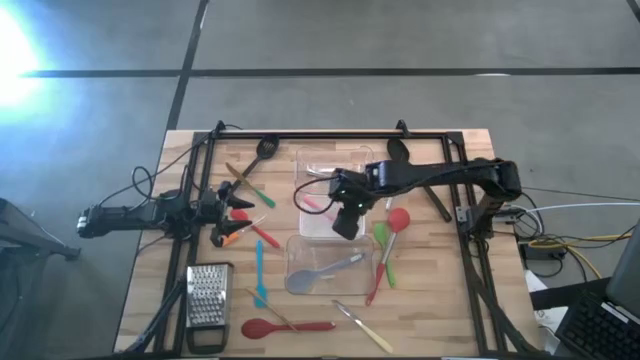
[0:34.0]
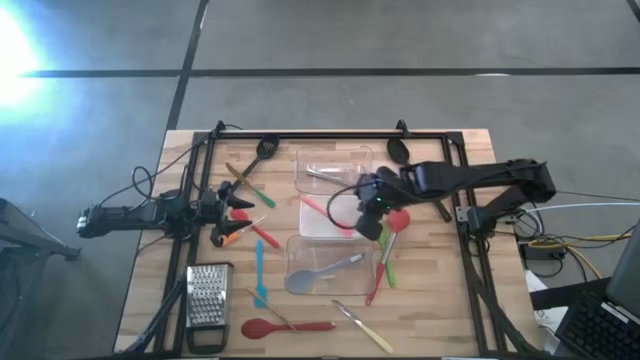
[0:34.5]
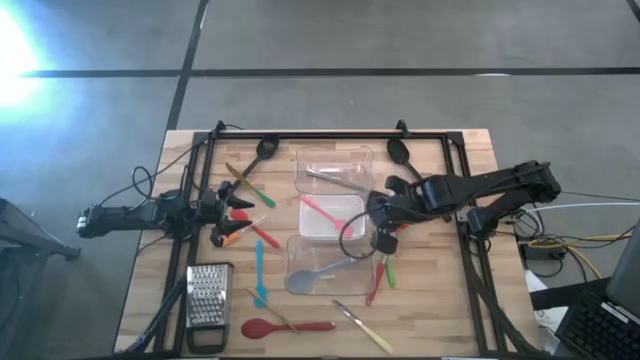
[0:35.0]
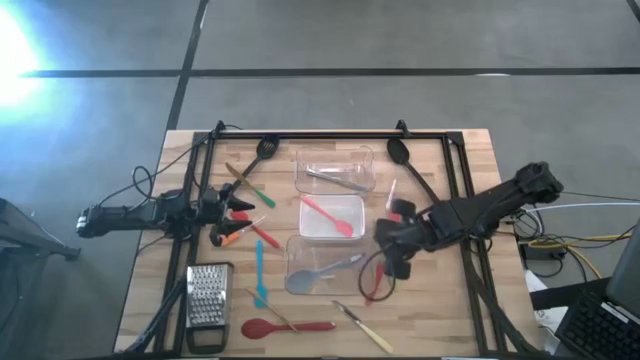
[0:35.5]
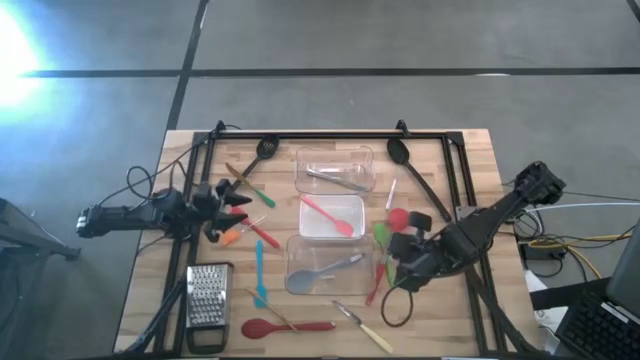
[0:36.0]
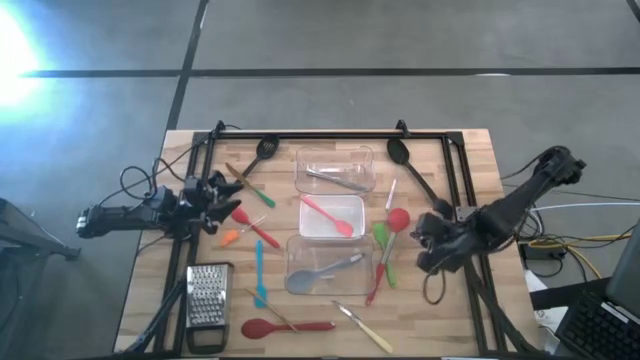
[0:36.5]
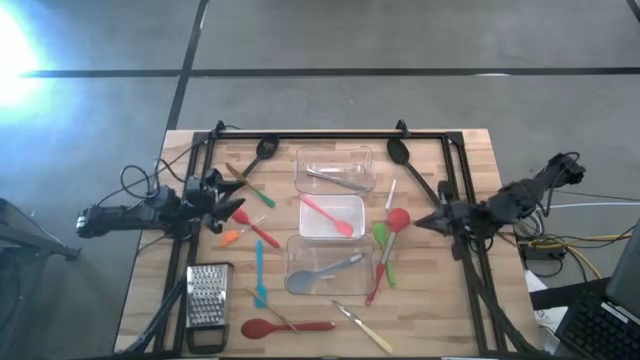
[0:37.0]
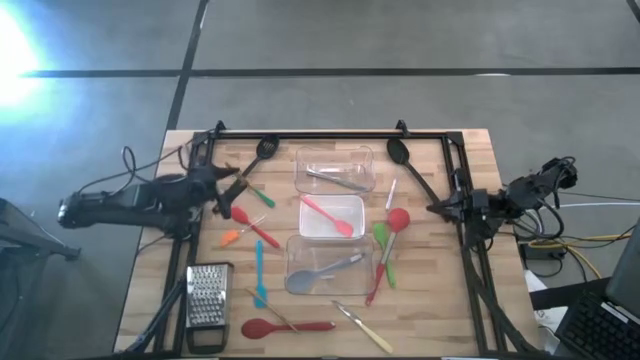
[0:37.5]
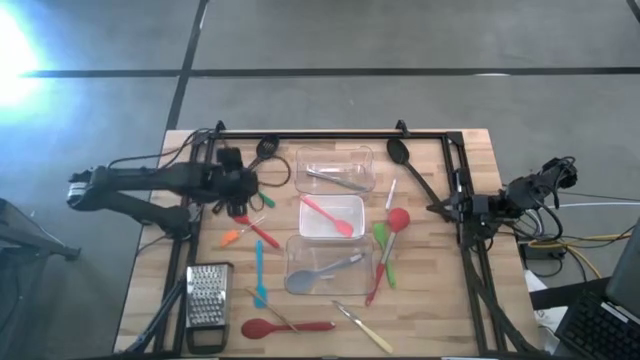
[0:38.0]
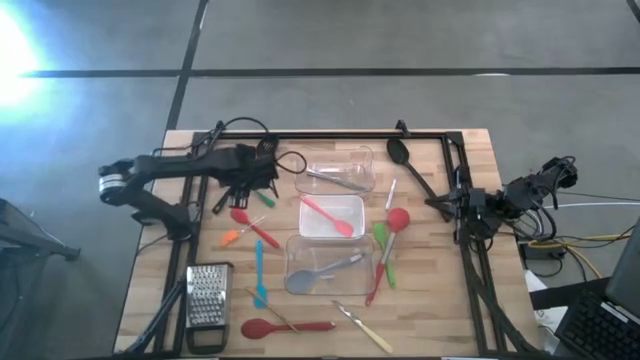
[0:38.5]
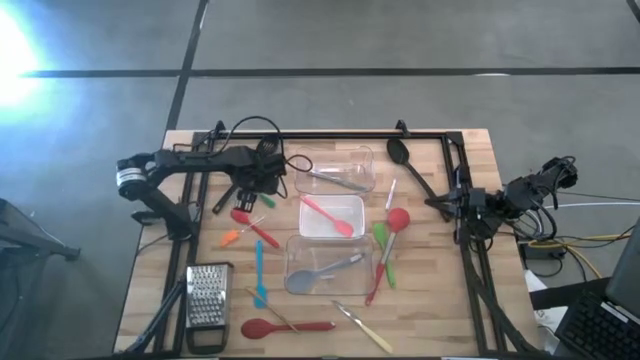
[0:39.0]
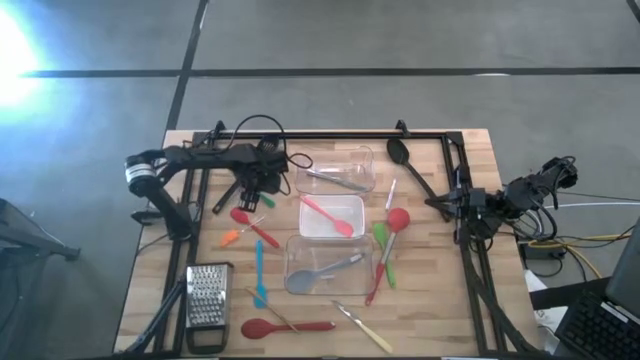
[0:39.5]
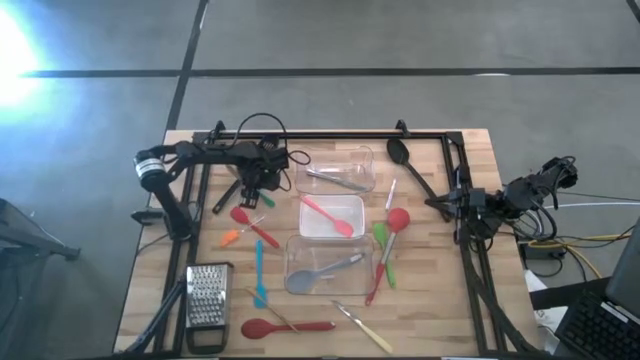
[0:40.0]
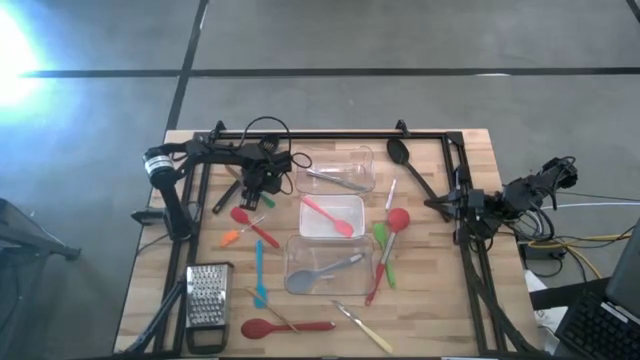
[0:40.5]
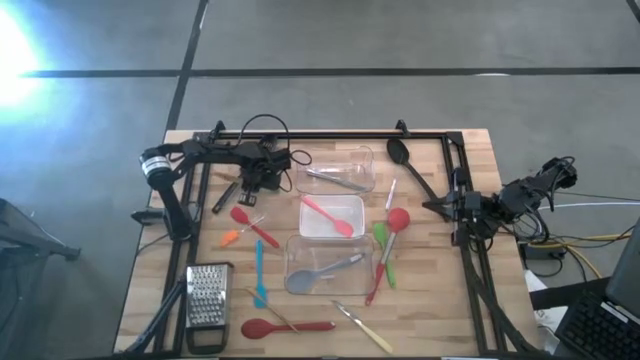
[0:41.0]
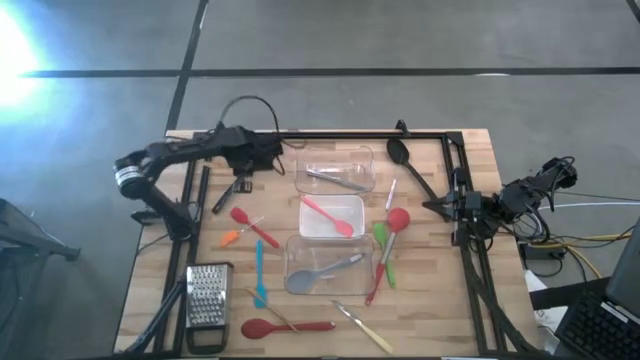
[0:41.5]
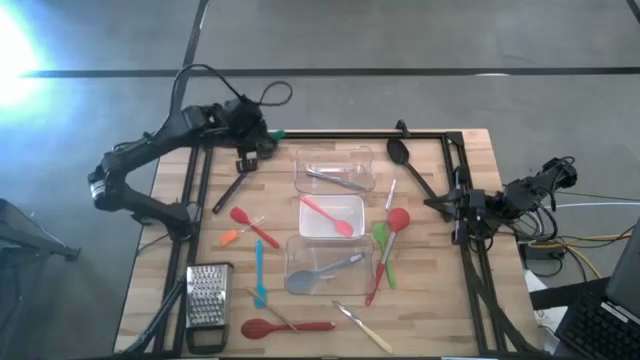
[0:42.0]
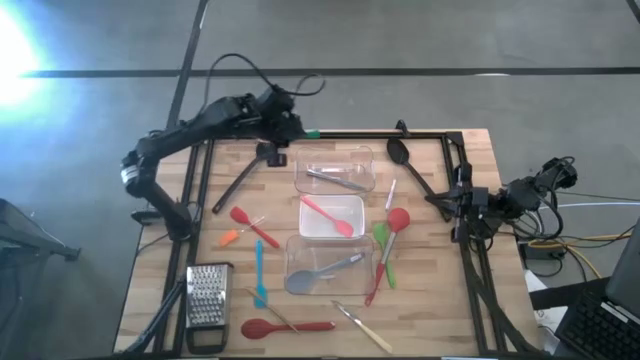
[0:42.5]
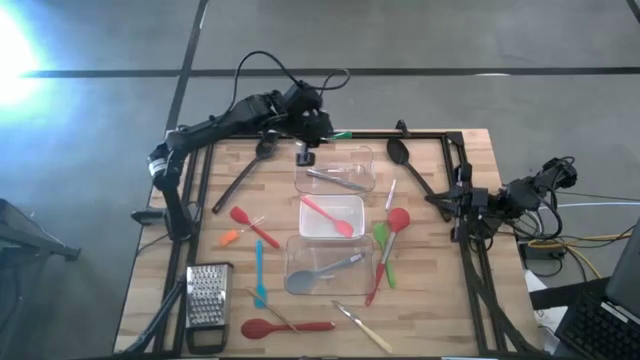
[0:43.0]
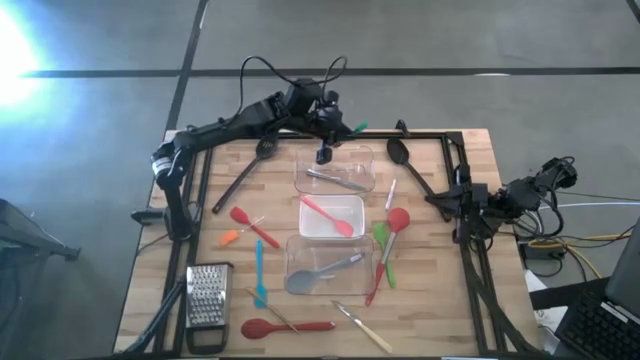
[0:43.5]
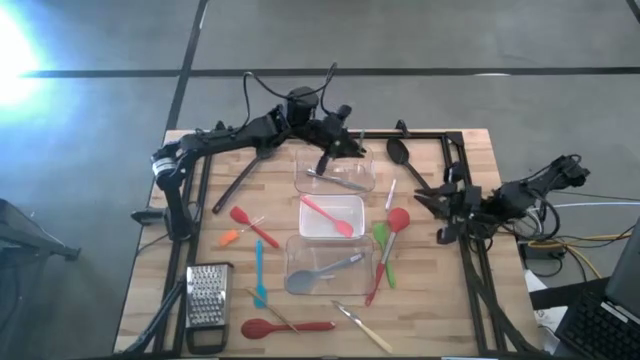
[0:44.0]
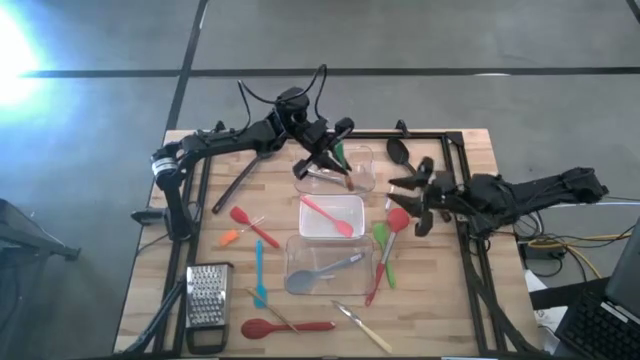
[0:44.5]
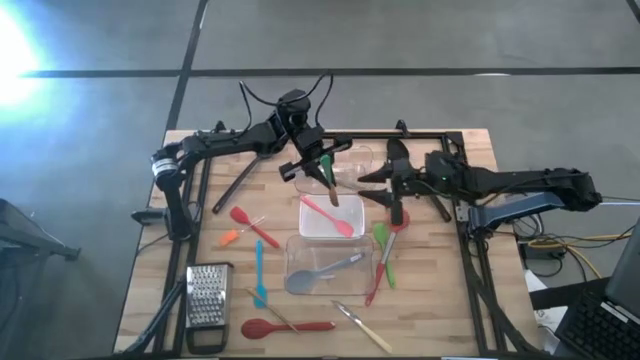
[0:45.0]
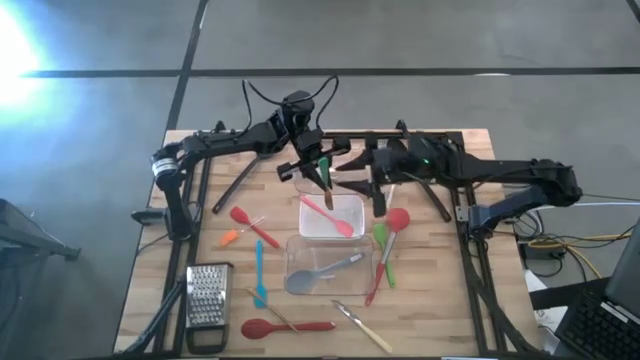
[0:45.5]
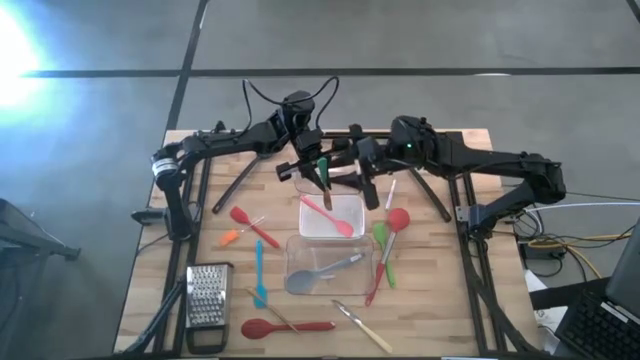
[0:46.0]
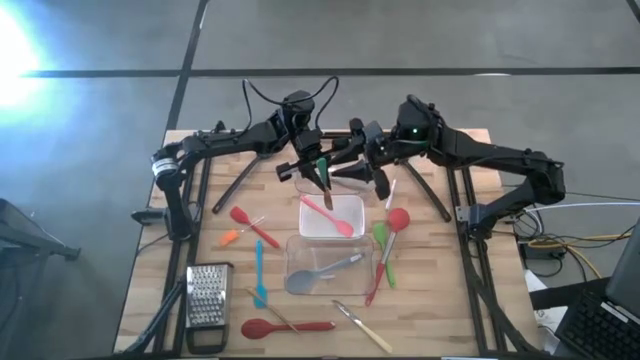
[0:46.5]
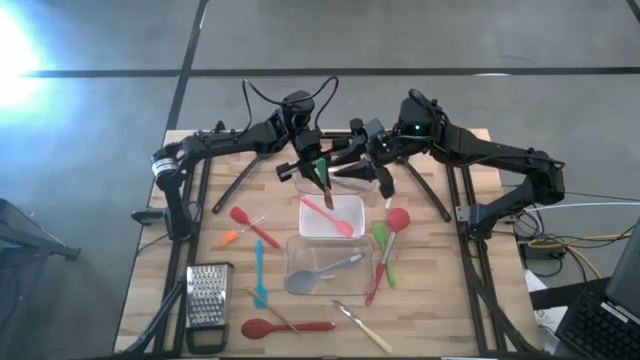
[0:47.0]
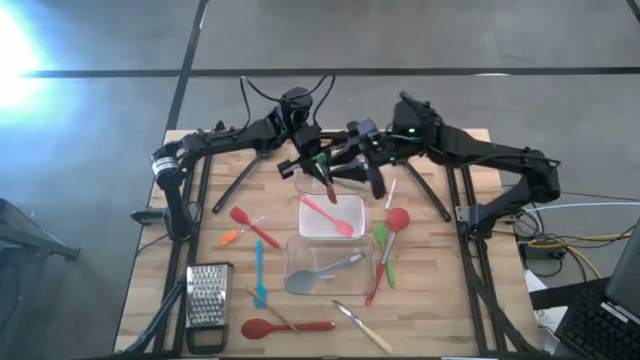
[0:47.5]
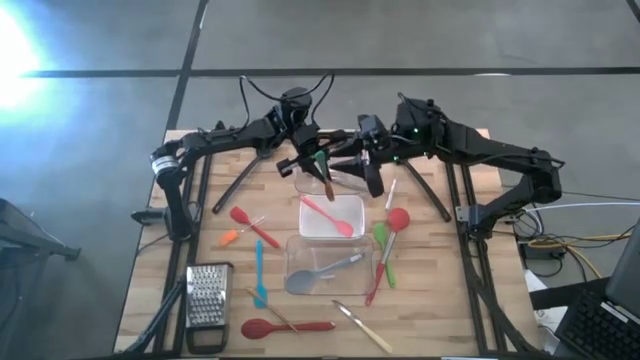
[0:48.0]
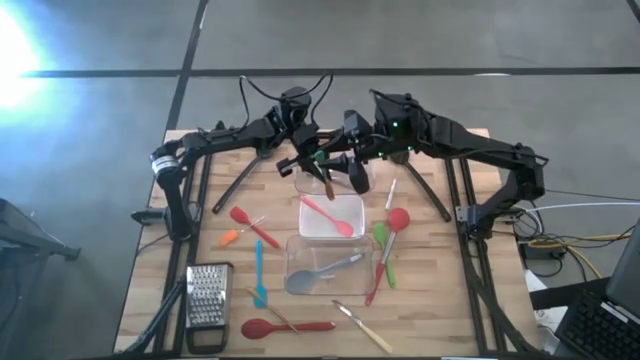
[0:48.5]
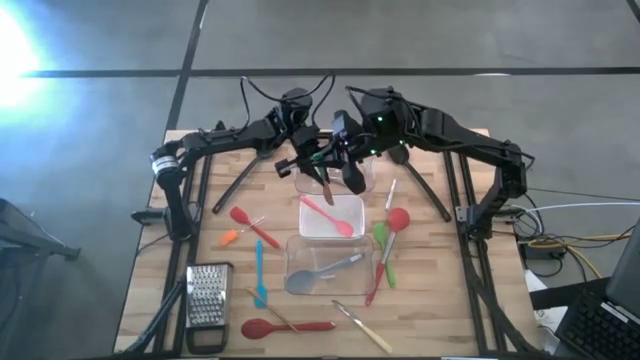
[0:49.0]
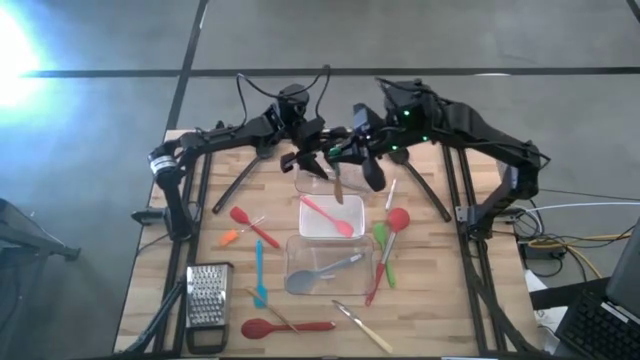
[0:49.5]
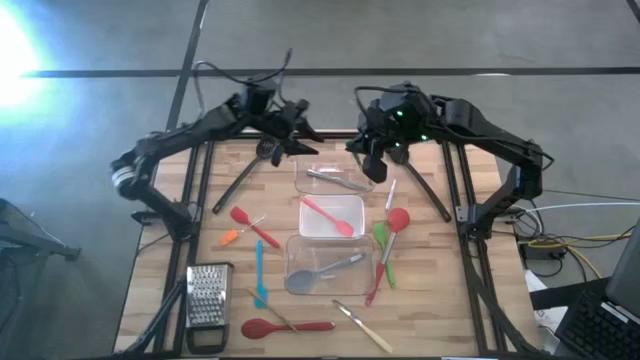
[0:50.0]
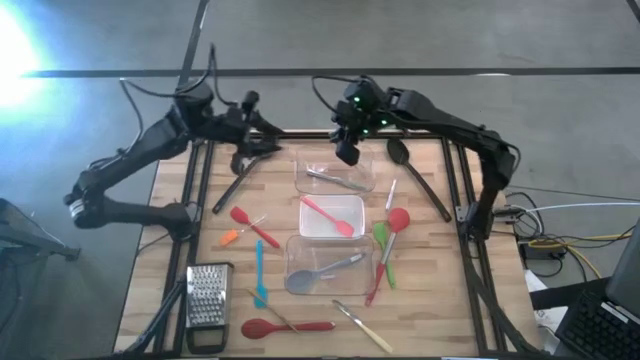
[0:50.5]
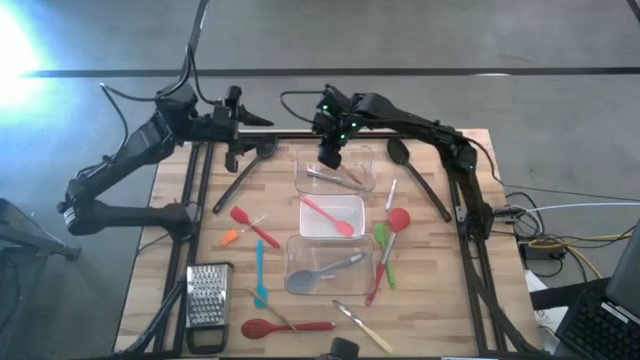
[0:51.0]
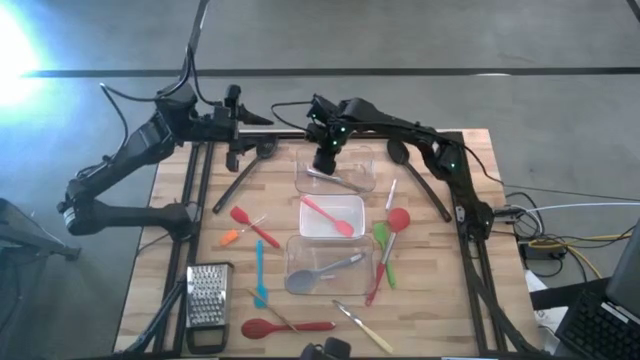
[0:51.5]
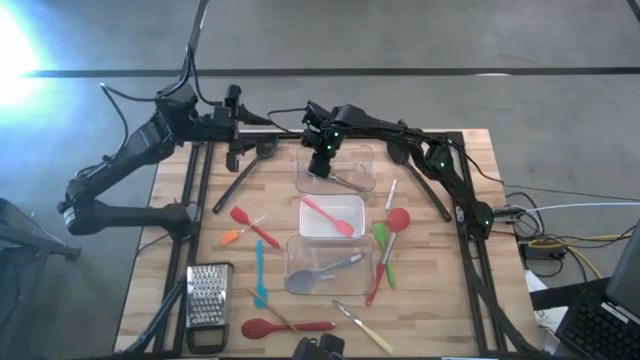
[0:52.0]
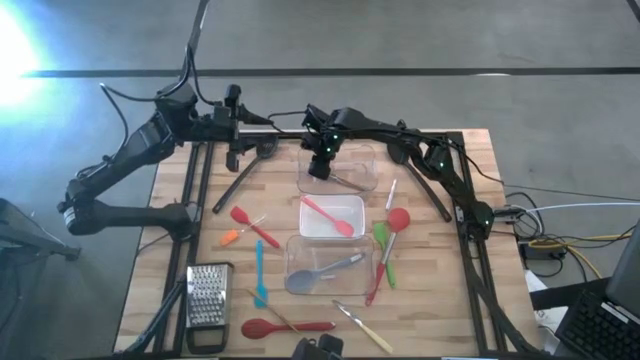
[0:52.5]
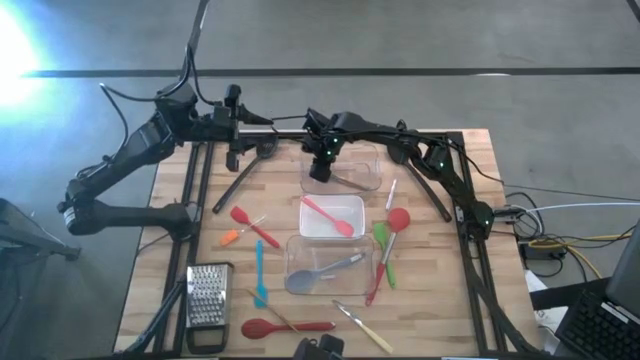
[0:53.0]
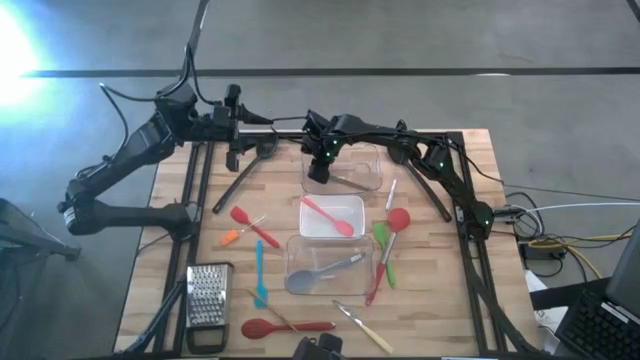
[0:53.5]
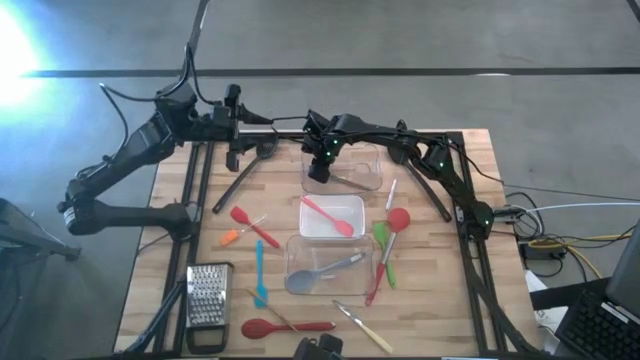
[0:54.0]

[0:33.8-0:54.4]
Task: Pick & Place Kitchen Items
Put the green knife into the top transparent bin
